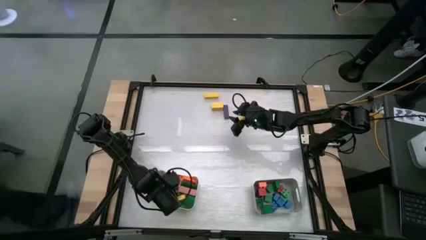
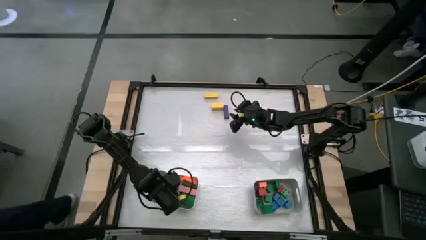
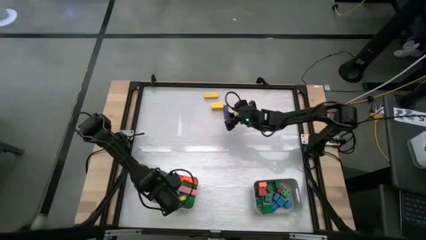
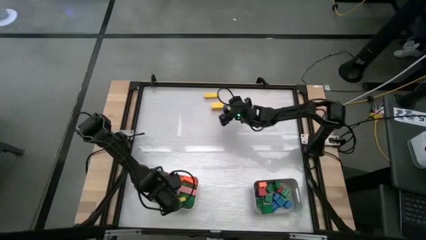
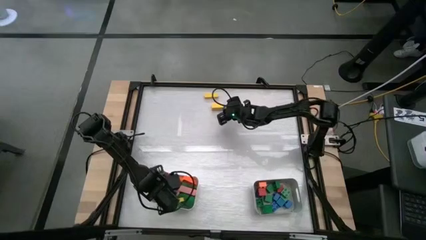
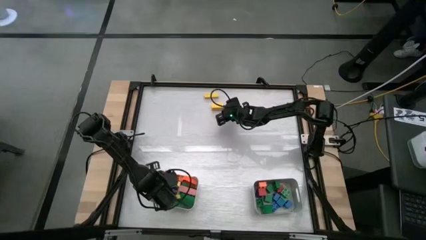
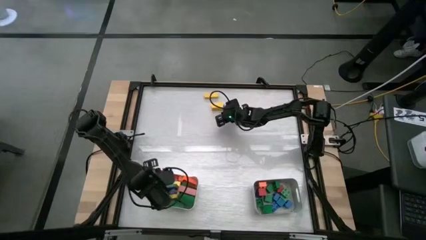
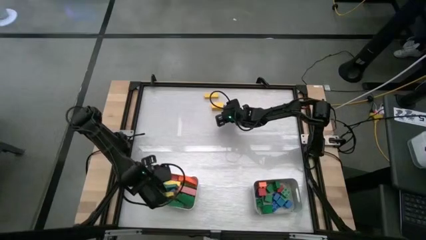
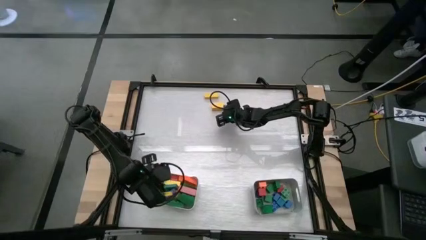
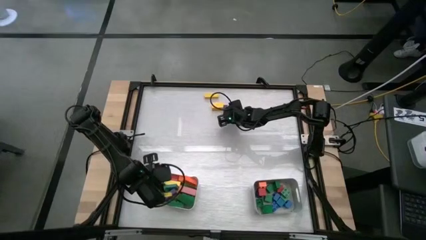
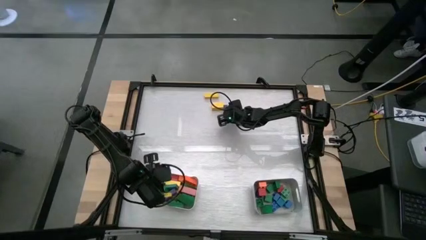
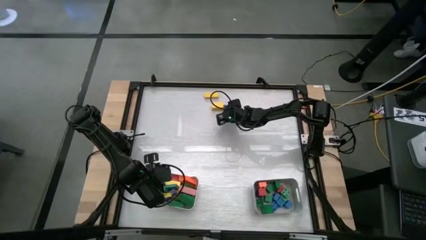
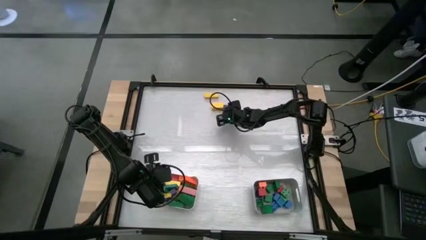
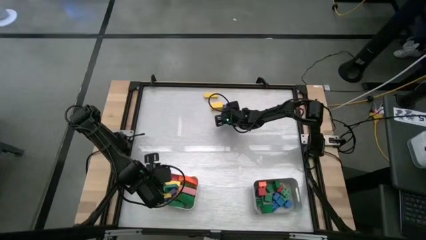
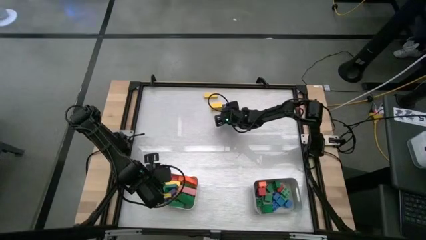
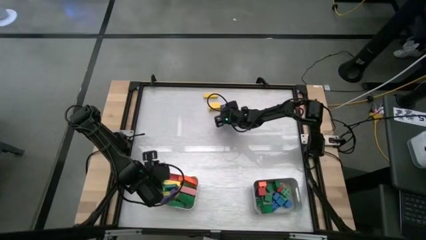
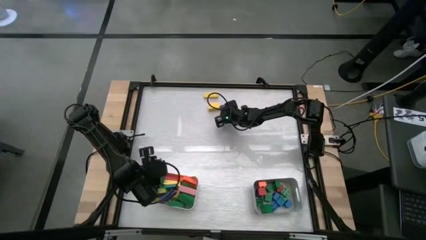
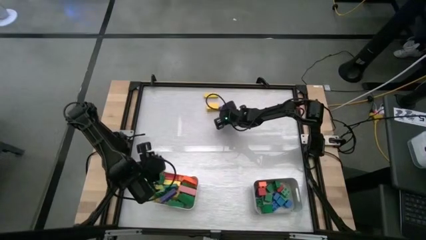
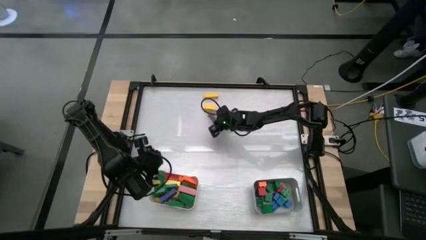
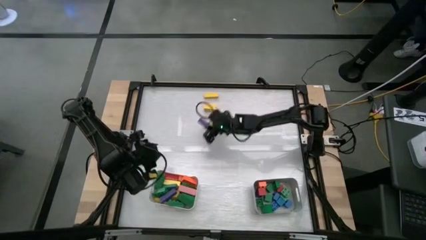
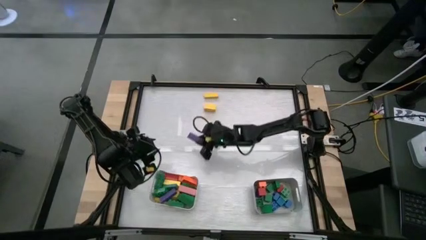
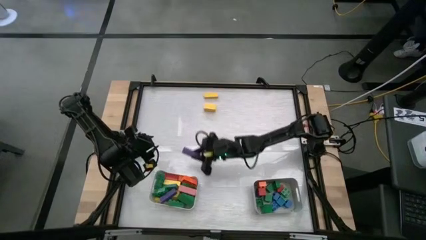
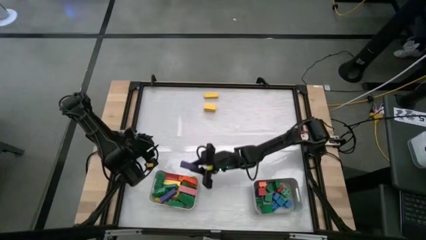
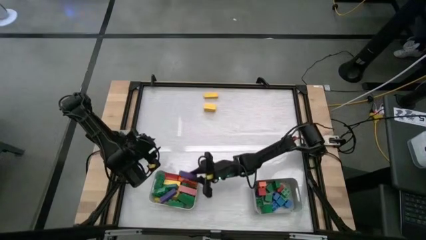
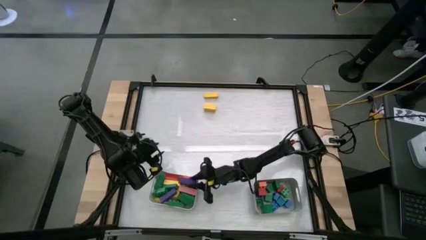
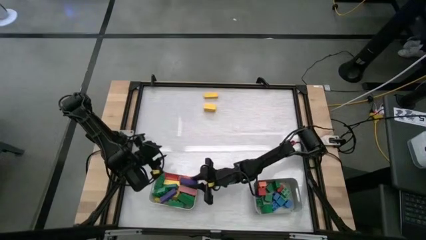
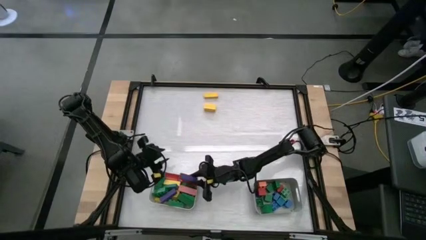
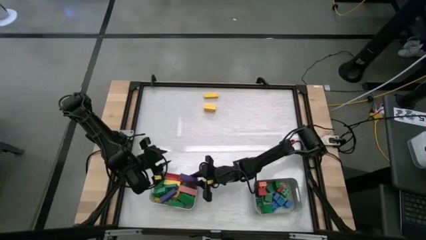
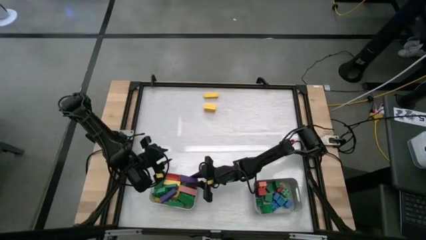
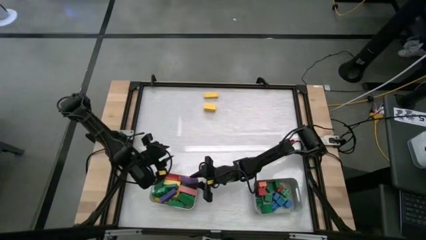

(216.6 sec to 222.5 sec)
Task: Sort blocks by size
Put the rectangular violet block into the white bin

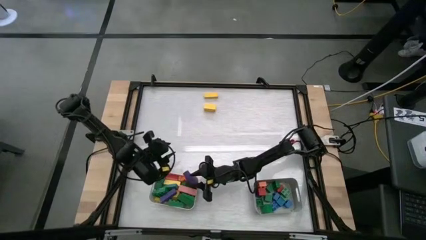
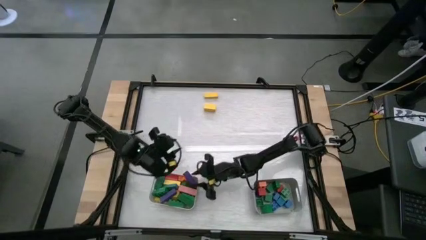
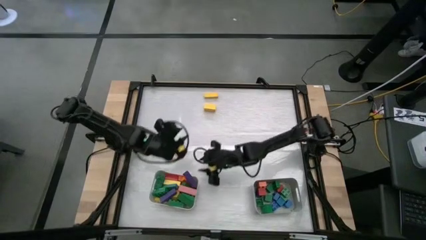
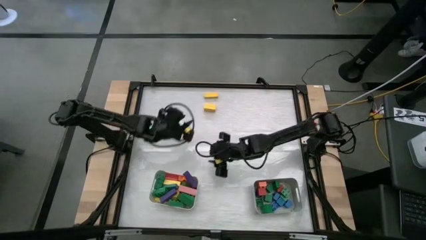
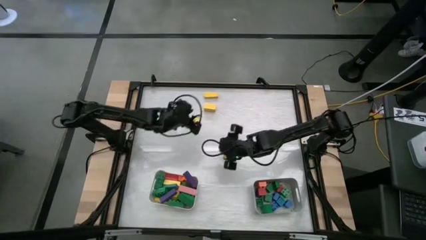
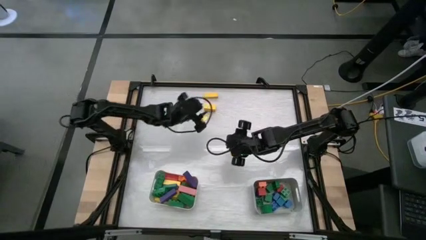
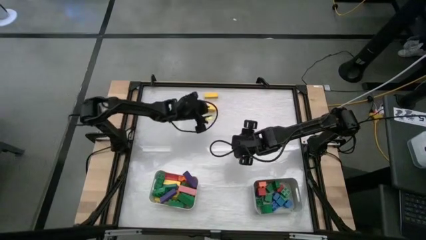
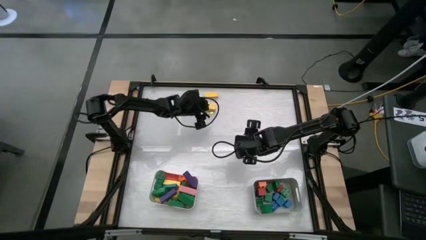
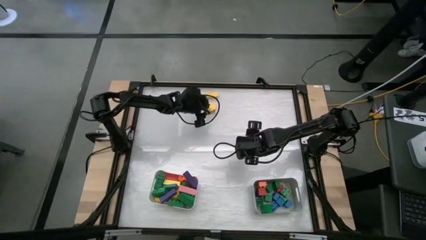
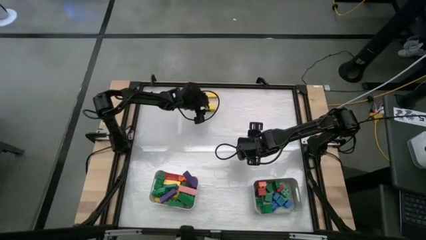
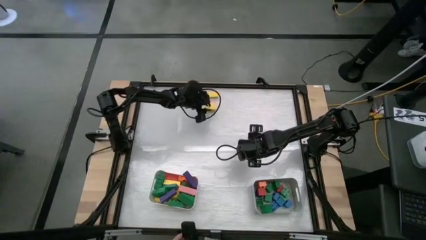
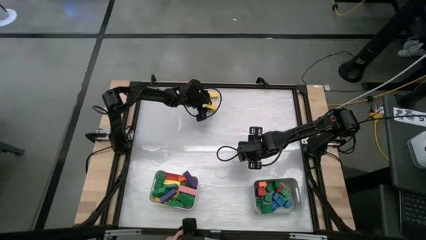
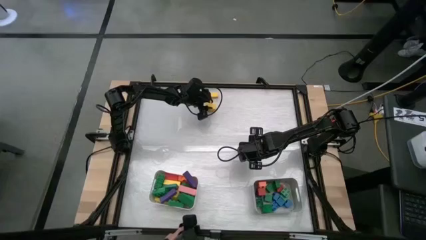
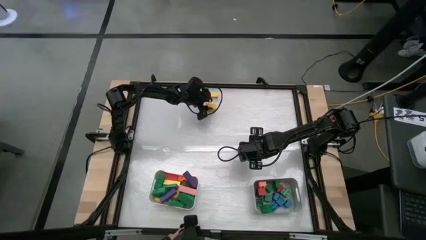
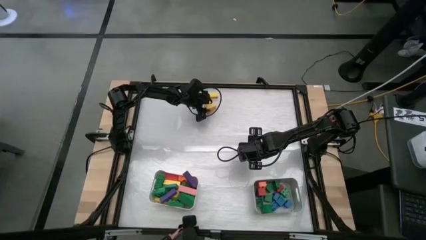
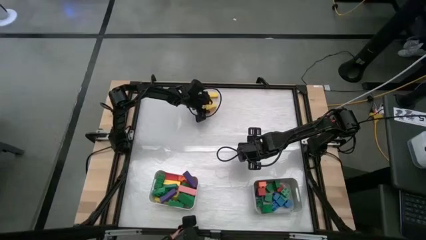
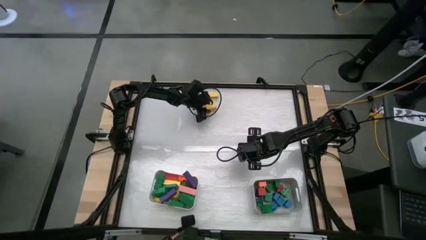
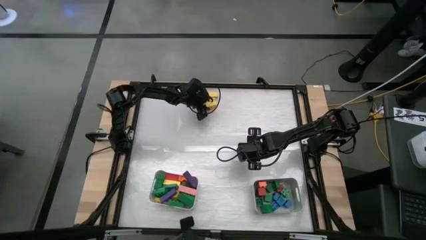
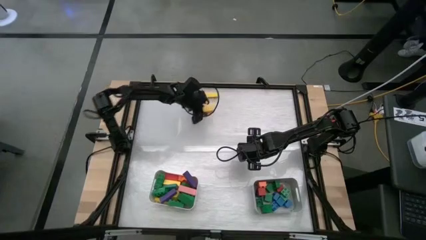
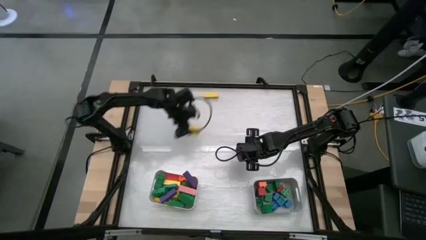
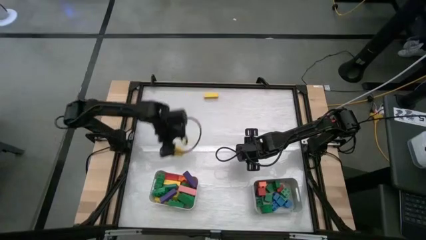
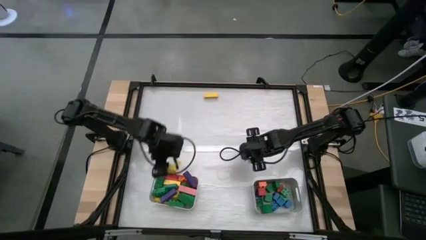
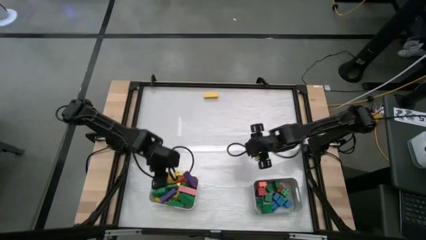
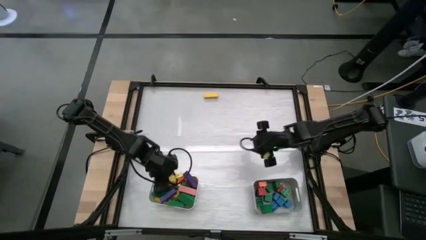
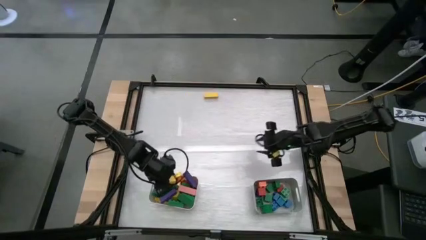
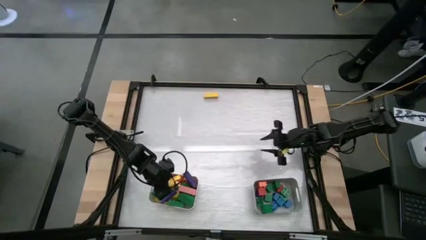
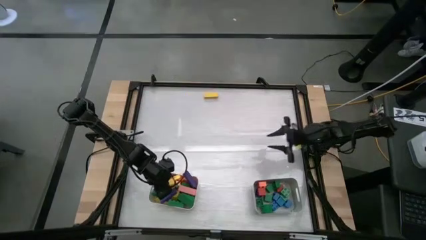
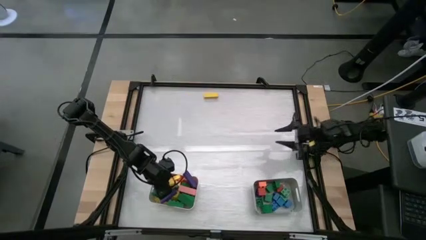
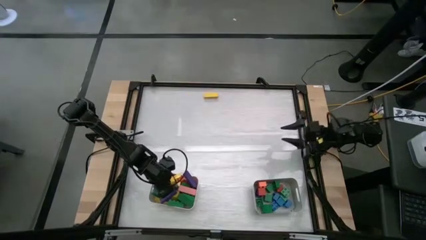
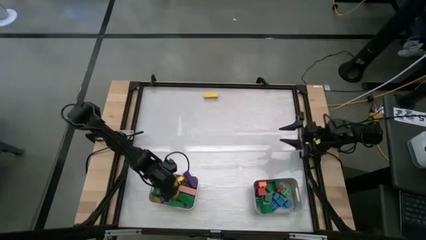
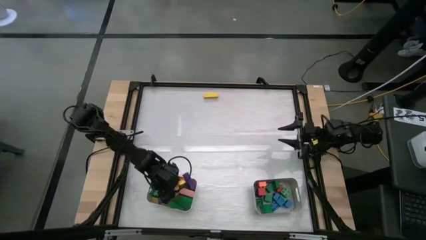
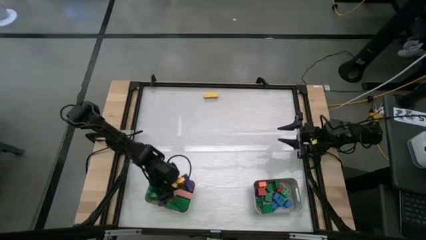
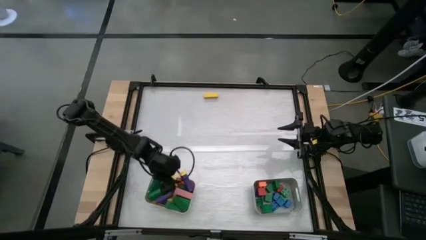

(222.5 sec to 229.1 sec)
Put the rectangular yellow block into the white bin

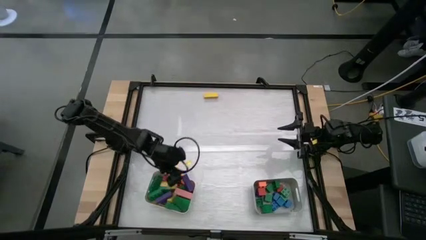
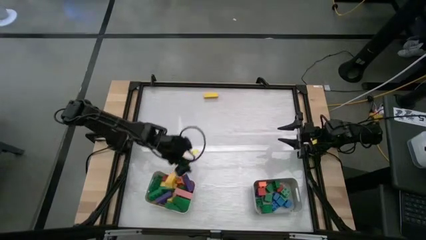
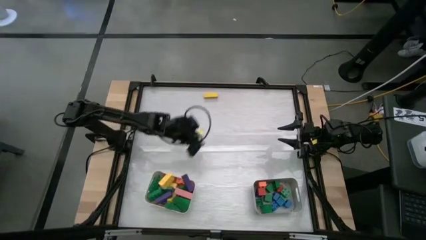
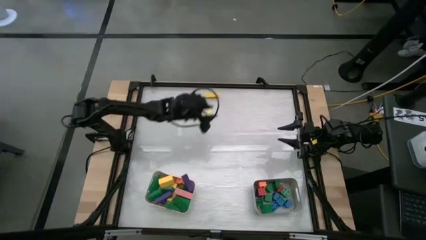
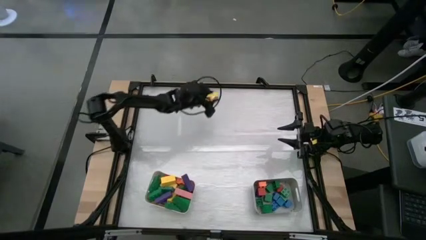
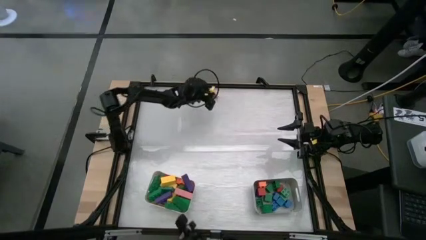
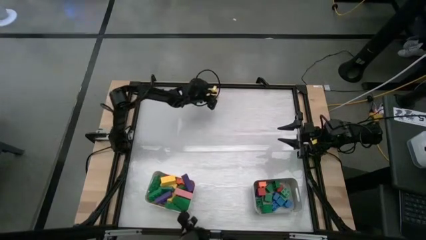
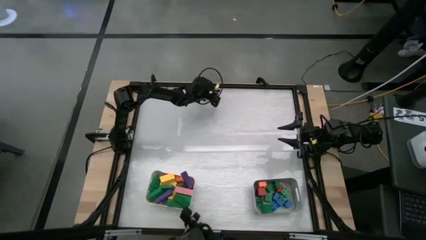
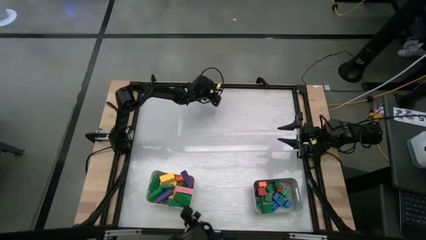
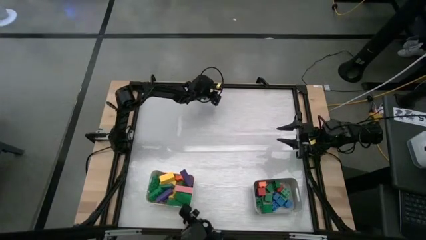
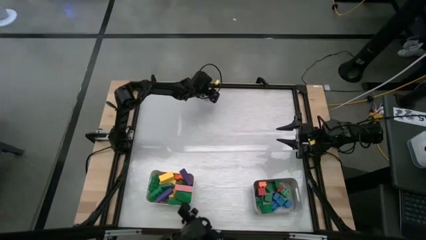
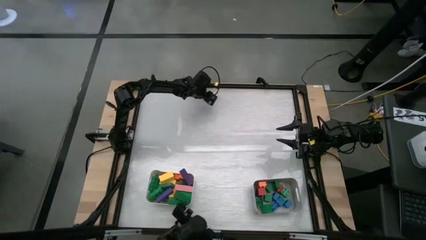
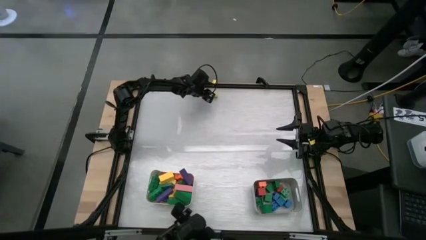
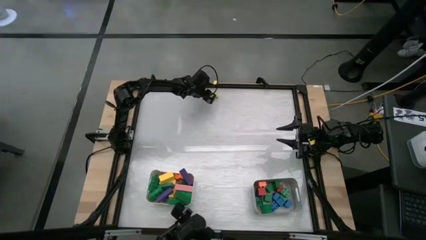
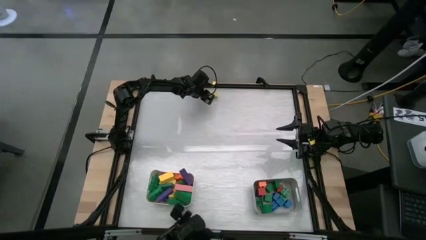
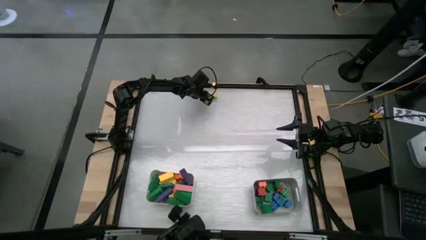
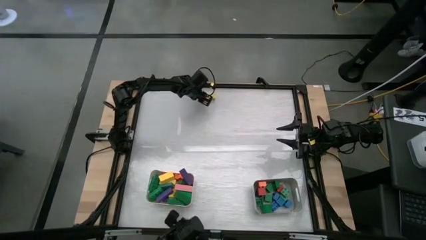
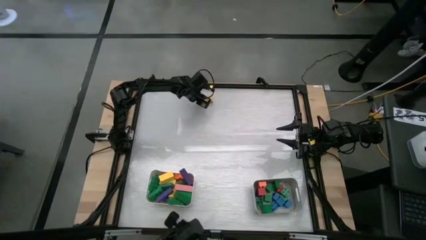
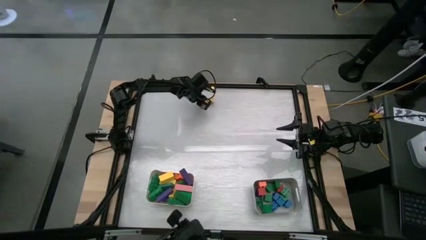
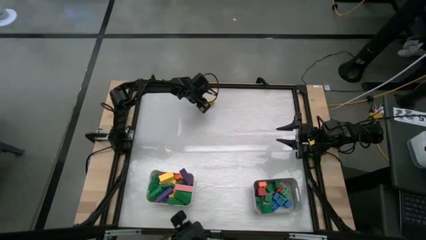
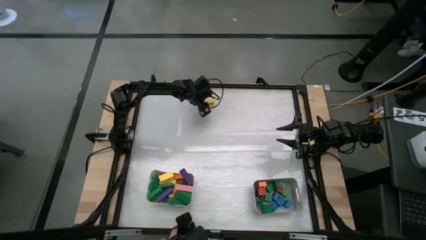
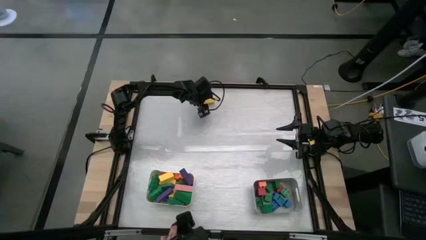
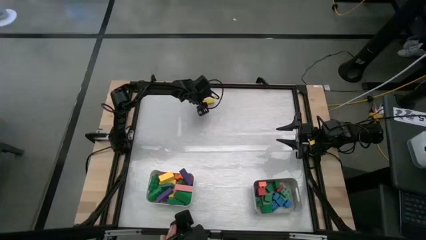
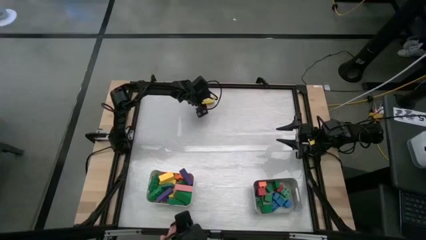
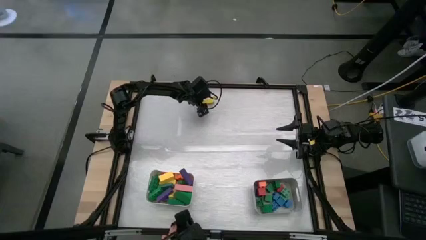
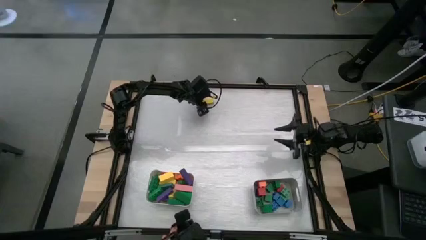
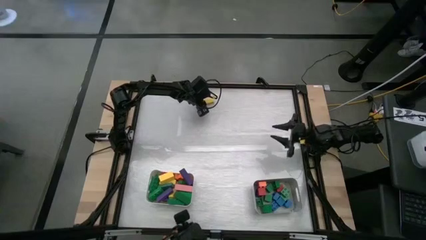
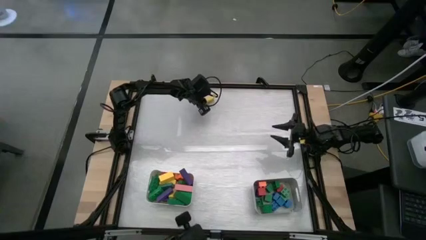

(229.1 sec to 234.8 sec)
Put the rectangular yellow block into the white bin
